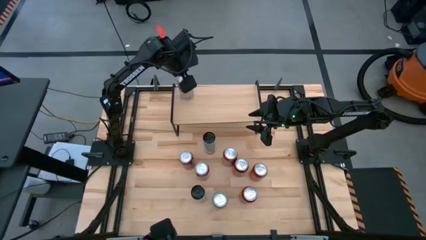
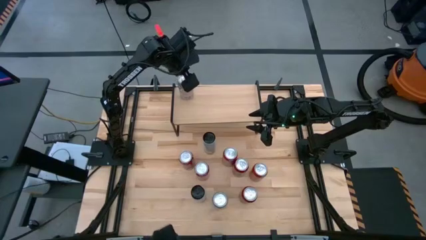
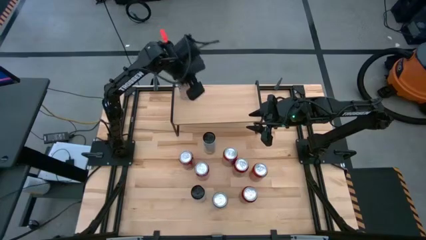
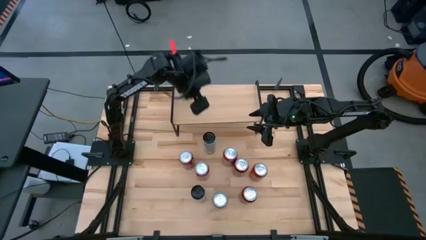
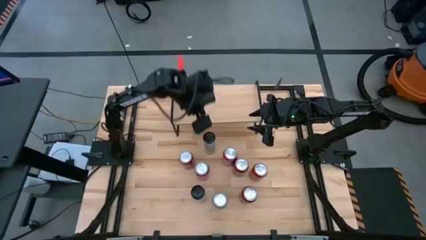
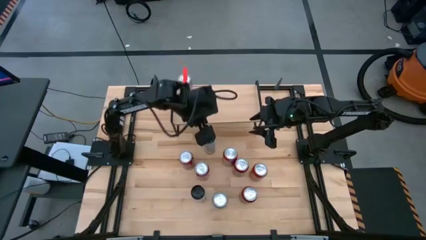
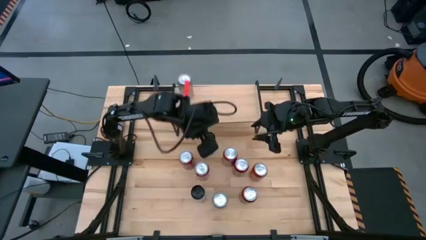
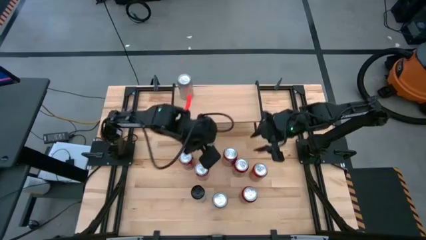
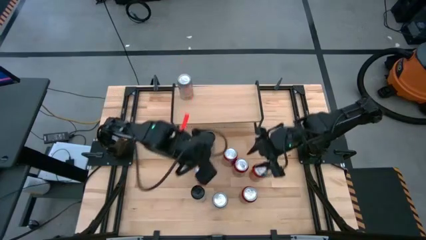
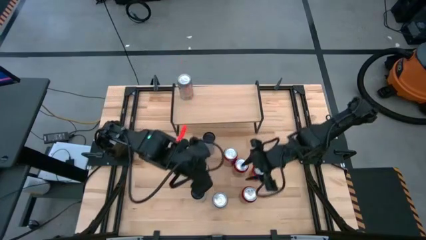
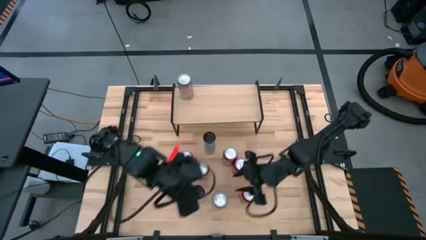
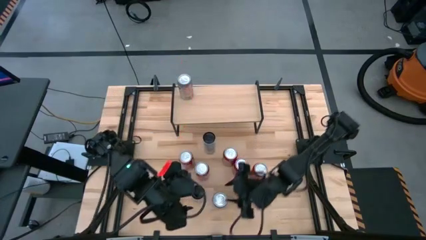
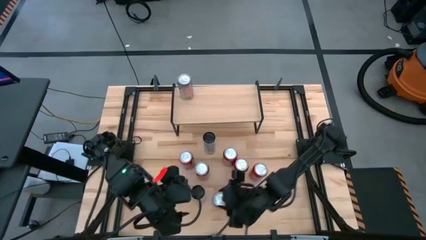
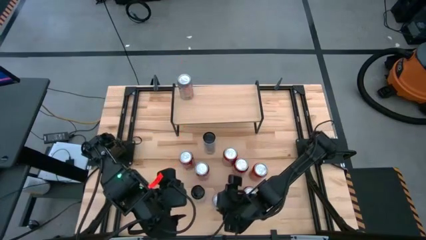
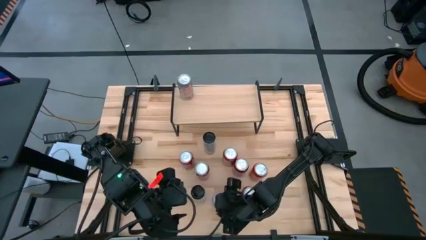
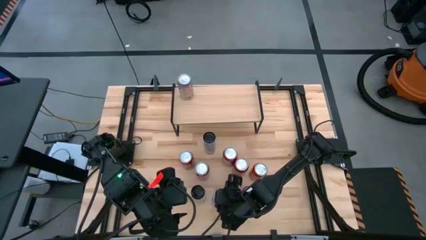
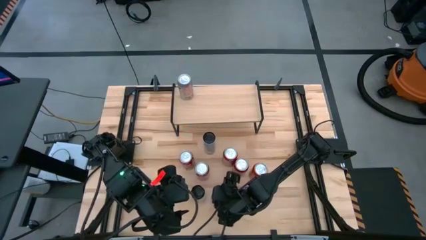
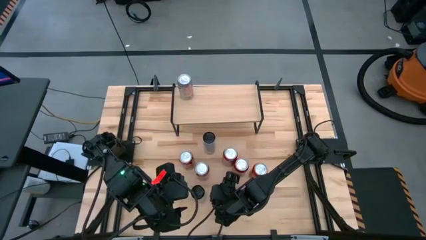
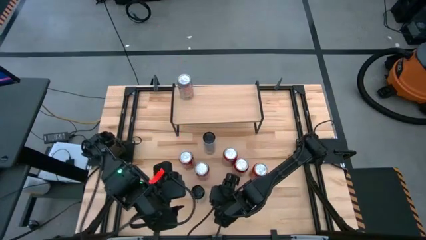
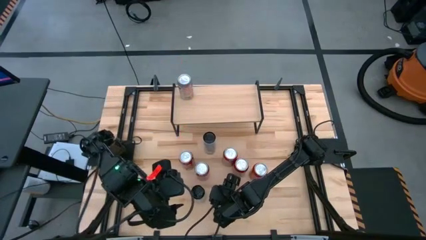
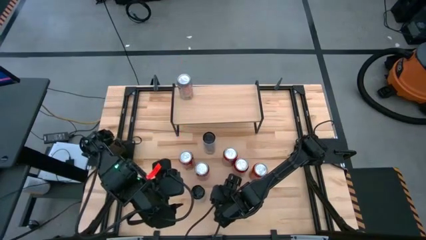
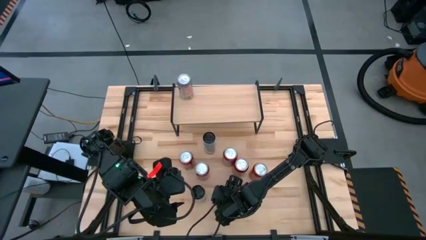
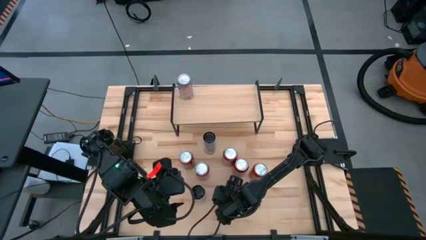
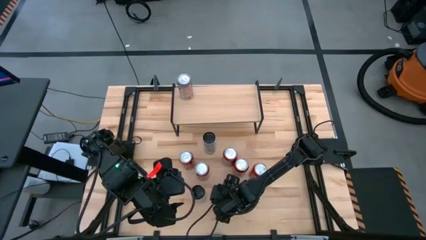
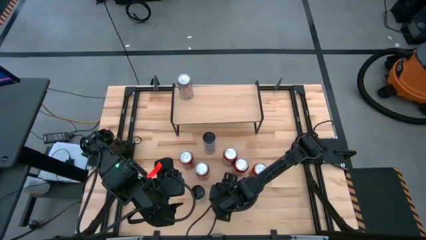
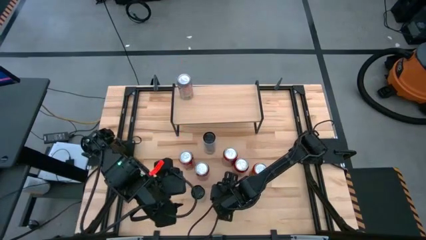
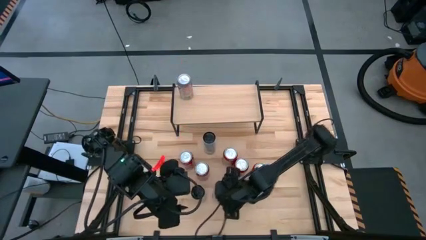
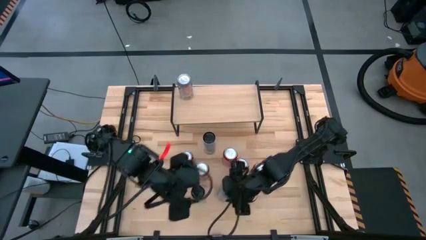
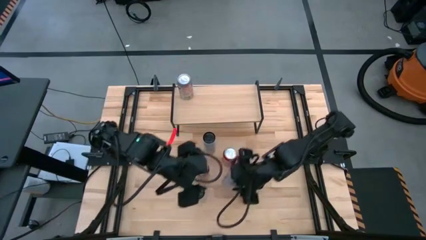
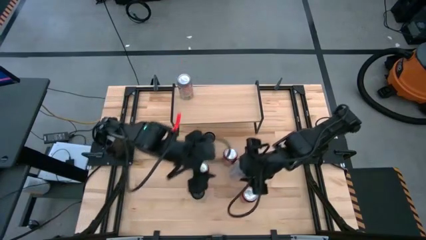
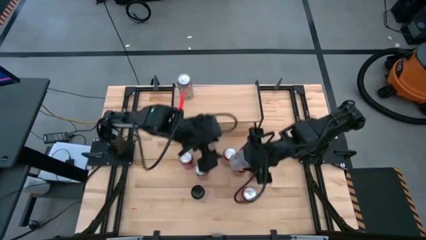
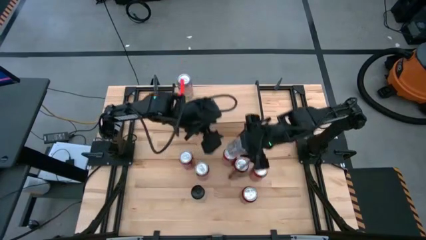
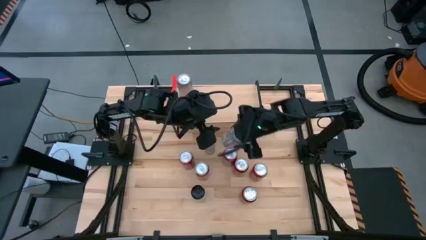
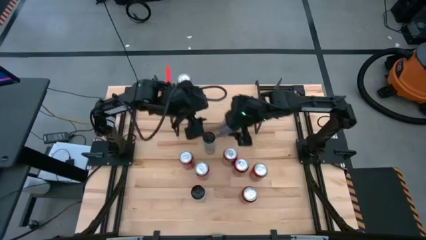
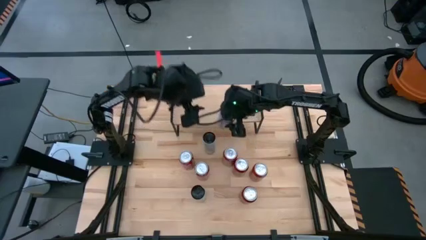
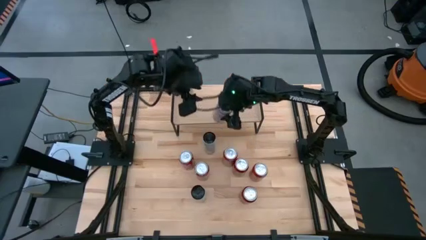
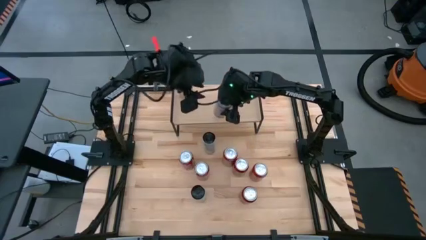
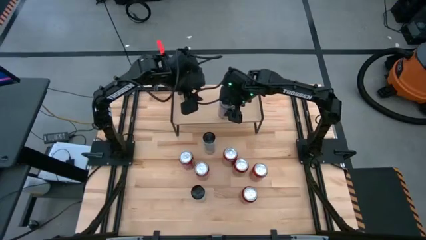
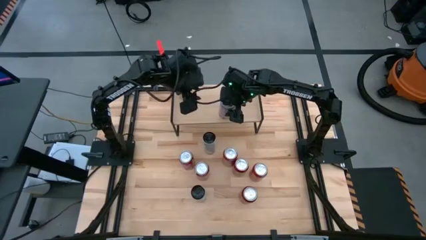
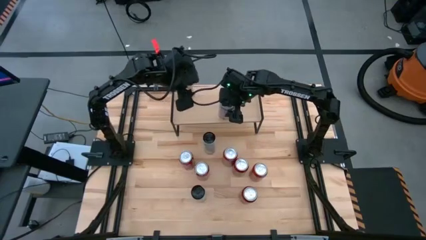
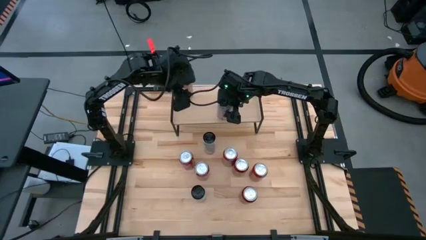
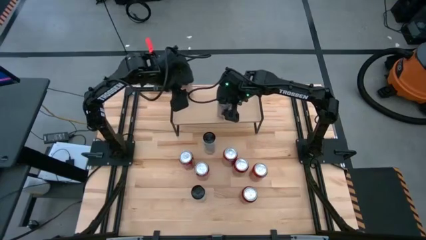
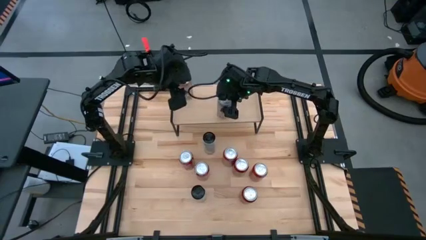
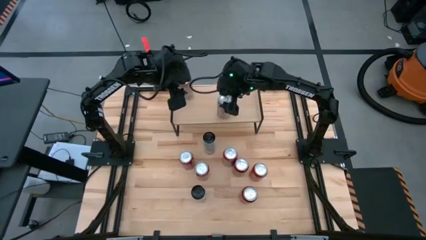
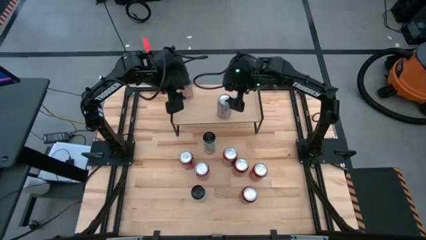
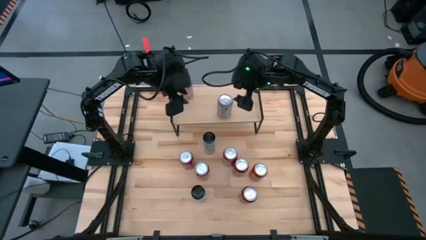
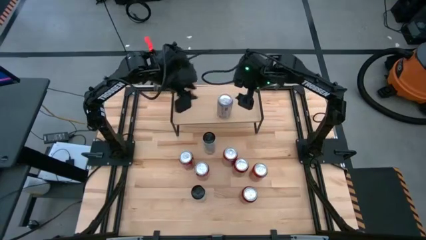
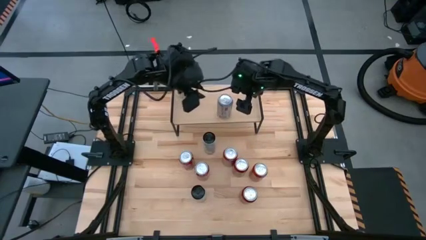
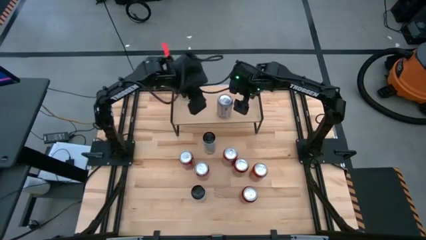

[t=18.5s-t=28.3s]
Task: Place canned beverage on shelf
Put the silver soda can aligned with the other silver soda can on the shelf

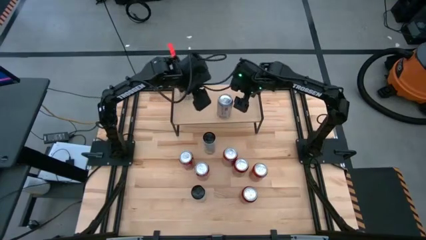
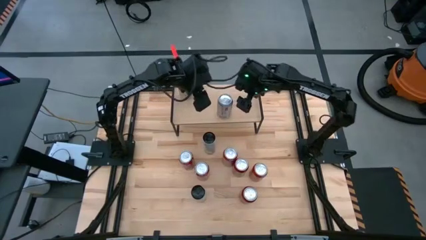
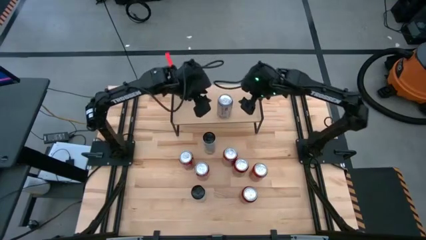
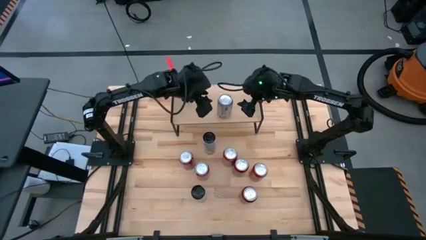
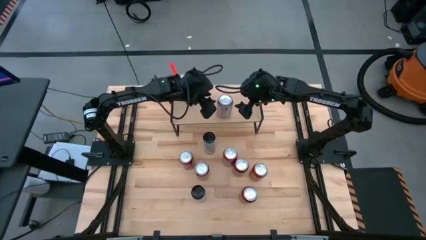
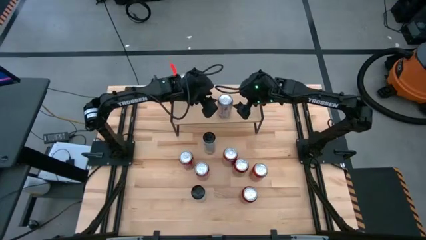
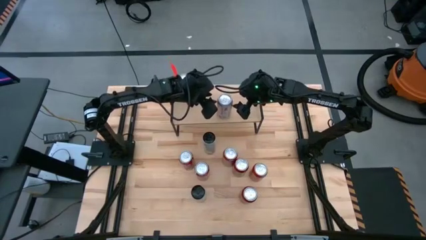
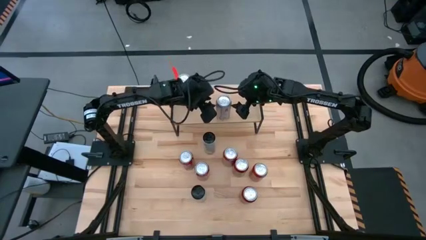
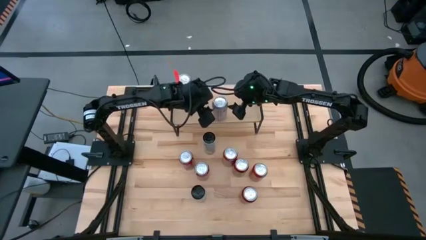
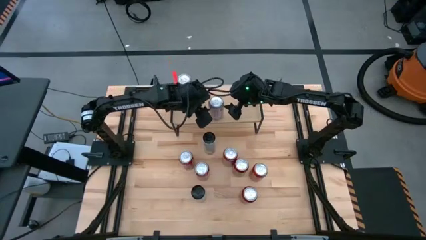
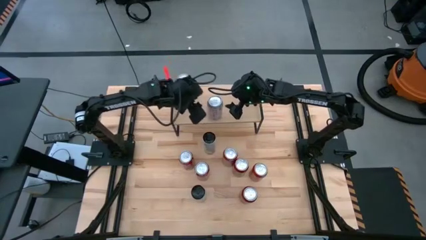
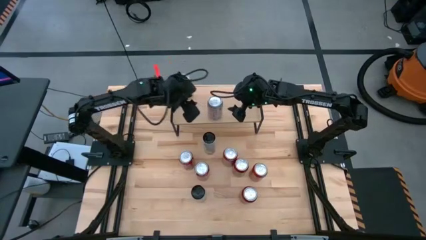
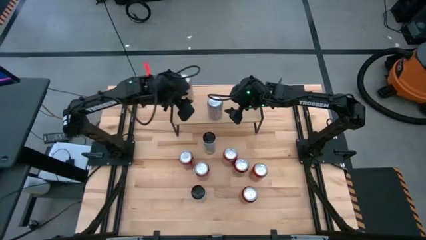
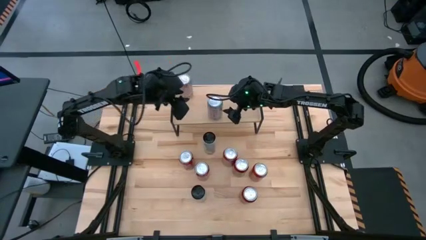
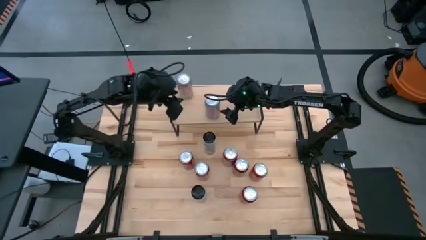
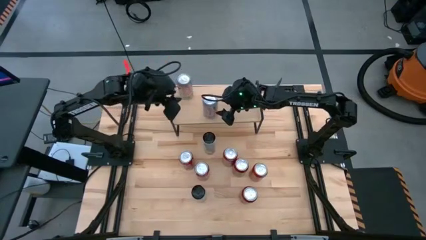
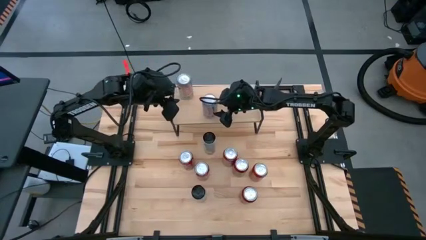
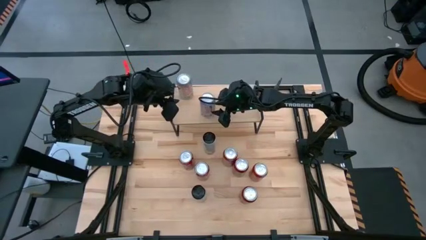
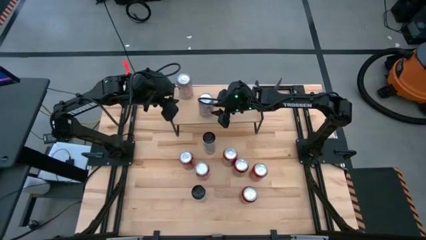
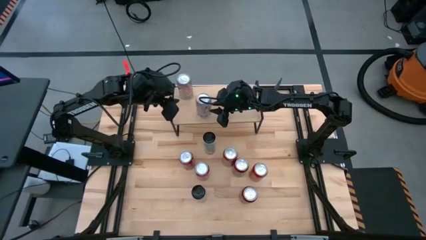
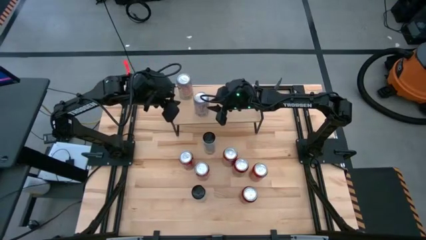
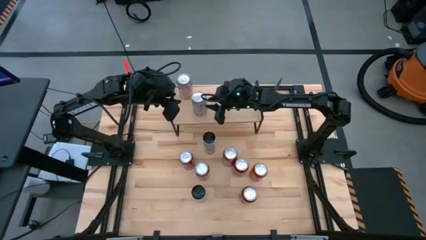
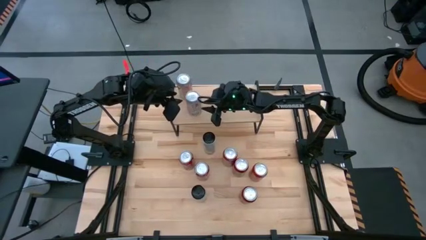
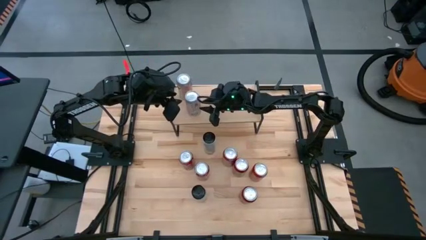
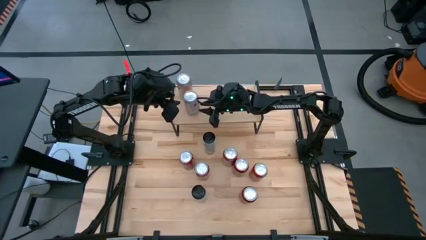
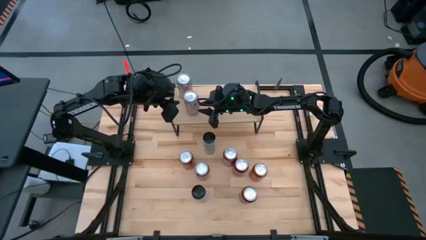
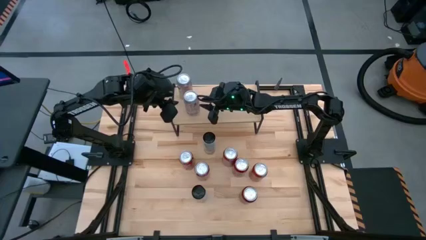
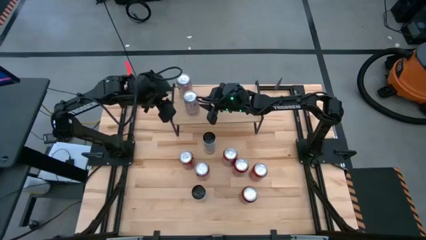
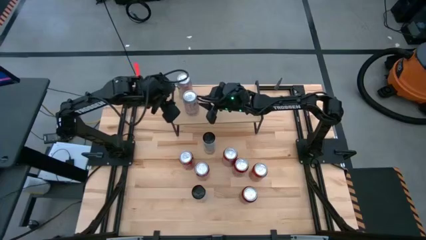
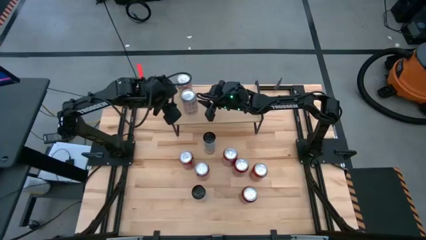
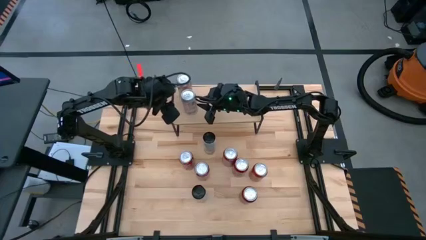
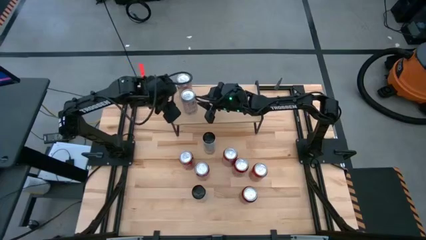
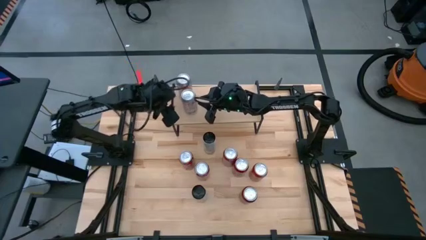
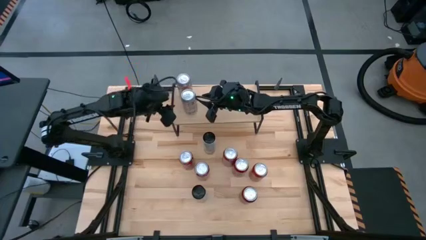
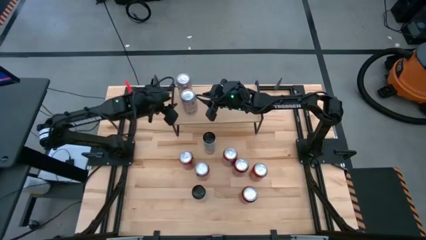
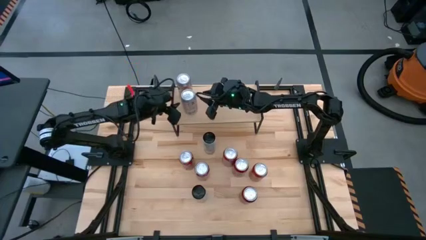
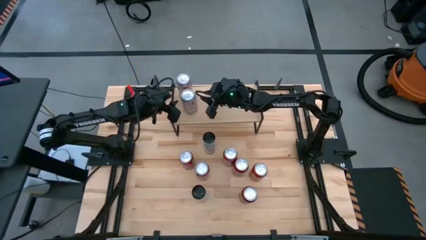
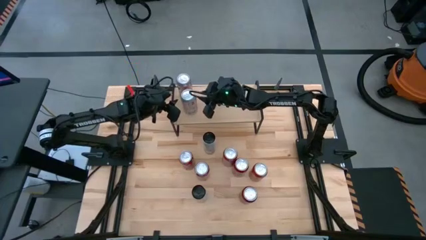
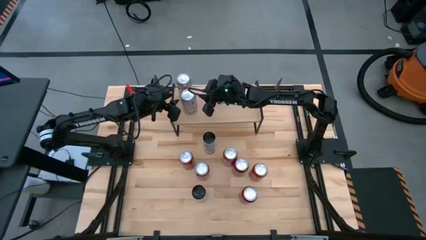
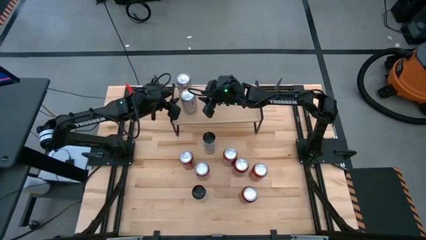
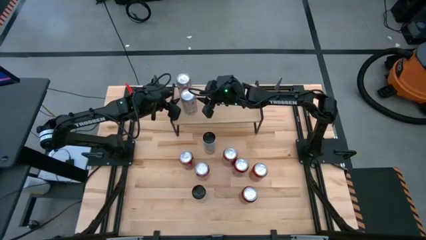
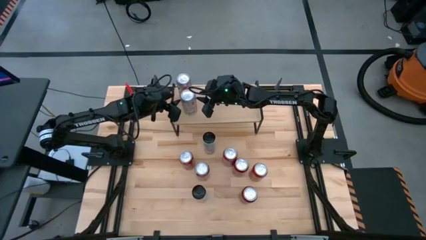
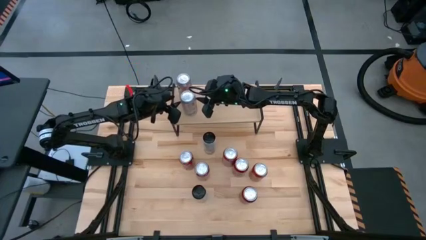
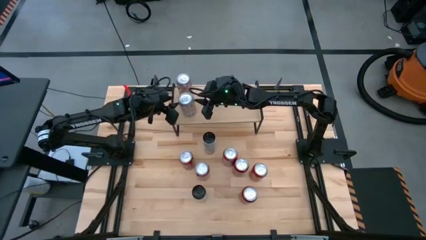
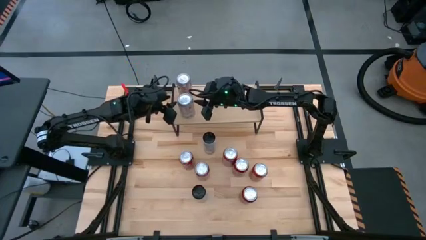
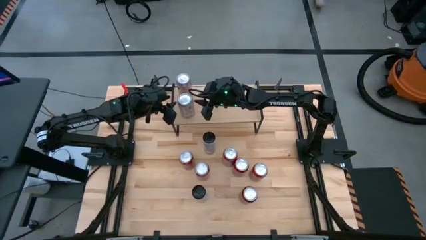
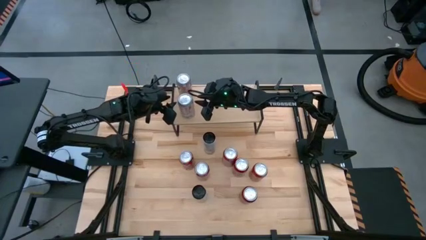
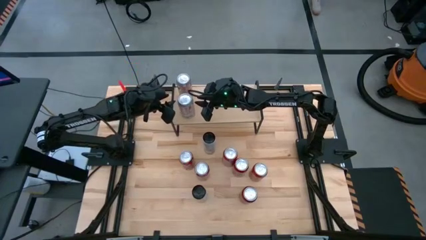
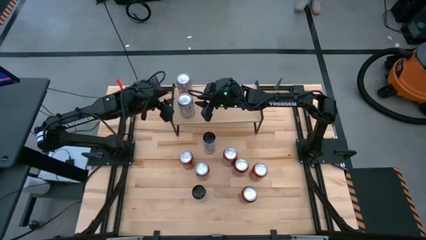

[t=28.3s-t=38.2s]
Put the silver soda can aligned with the other silver soda can on the shelf
